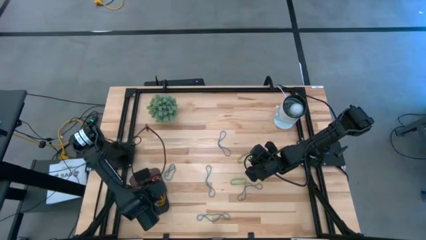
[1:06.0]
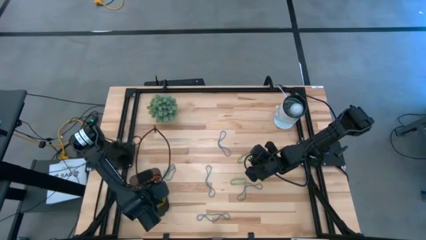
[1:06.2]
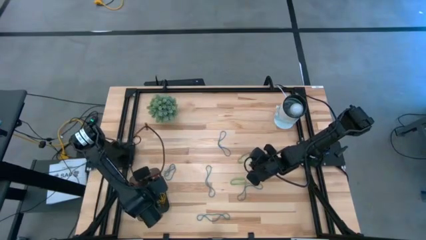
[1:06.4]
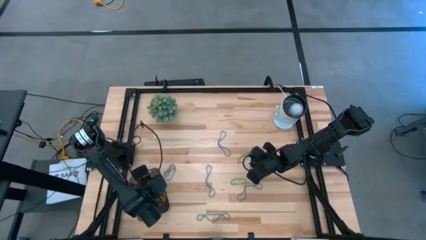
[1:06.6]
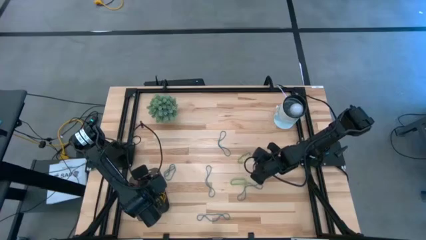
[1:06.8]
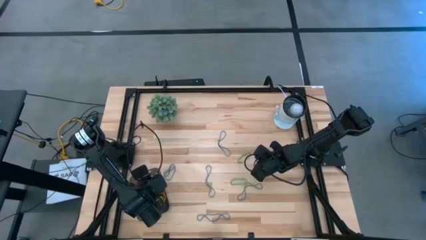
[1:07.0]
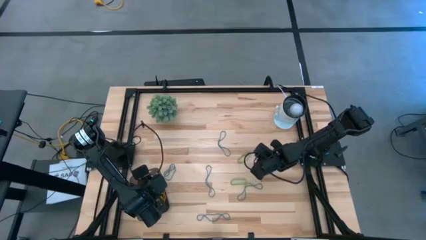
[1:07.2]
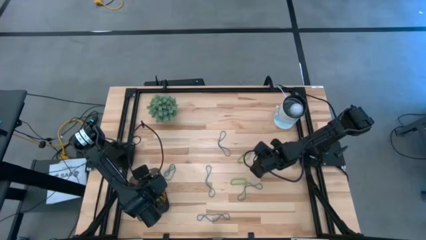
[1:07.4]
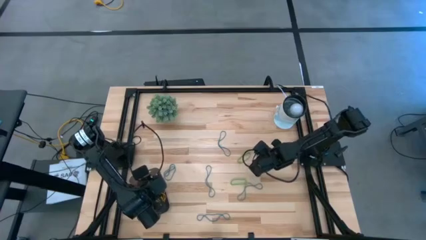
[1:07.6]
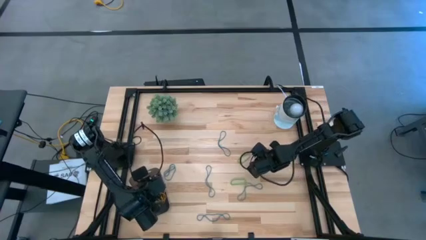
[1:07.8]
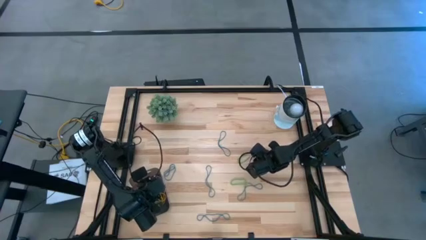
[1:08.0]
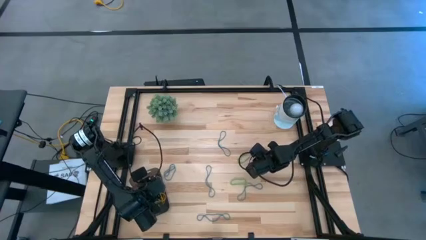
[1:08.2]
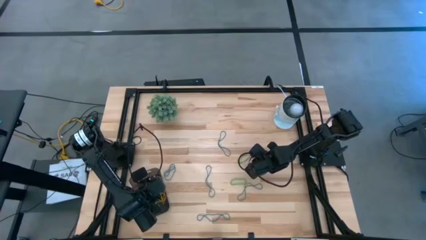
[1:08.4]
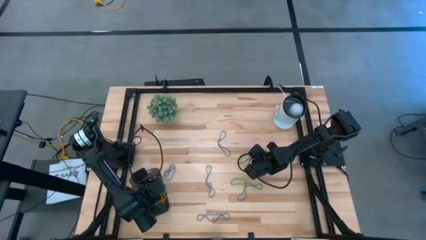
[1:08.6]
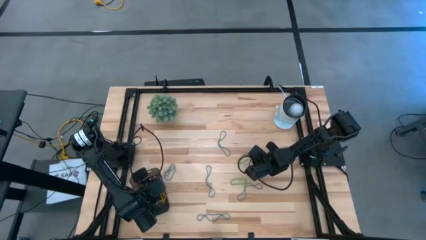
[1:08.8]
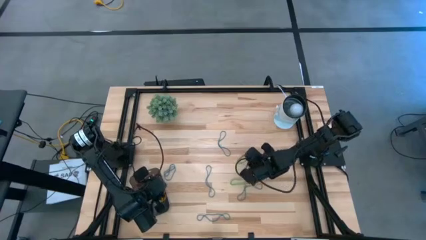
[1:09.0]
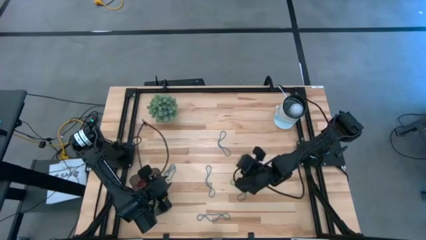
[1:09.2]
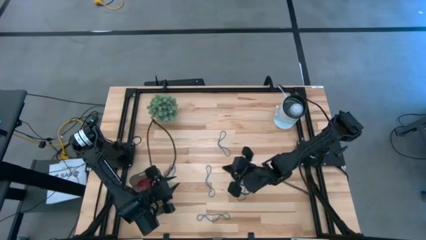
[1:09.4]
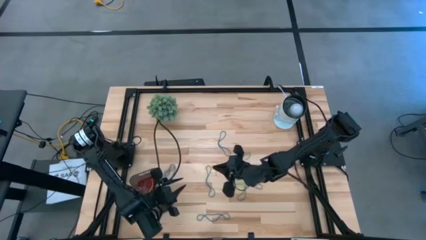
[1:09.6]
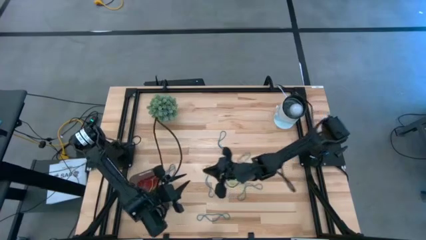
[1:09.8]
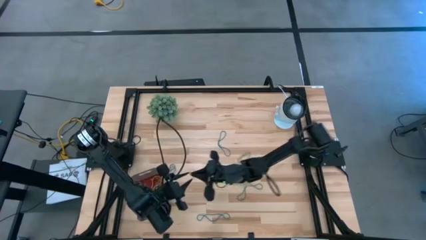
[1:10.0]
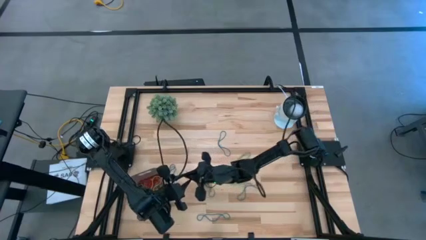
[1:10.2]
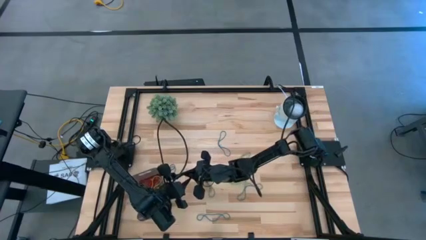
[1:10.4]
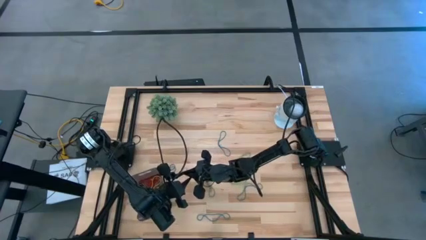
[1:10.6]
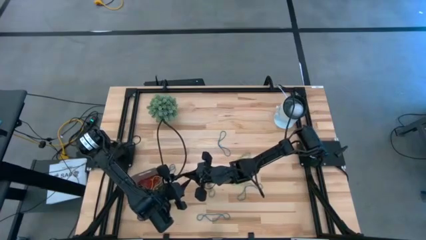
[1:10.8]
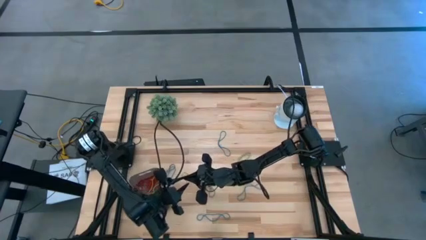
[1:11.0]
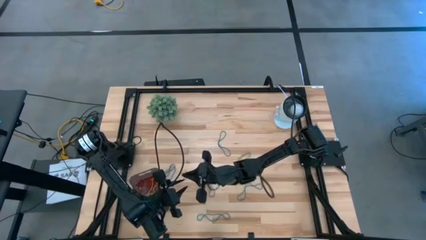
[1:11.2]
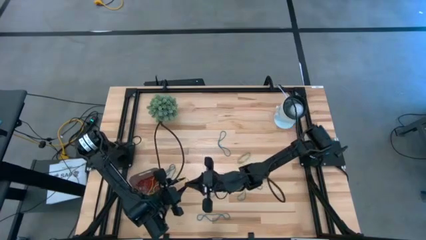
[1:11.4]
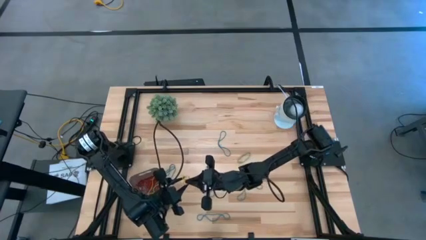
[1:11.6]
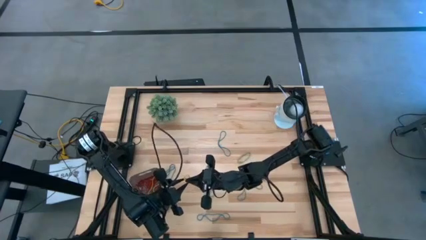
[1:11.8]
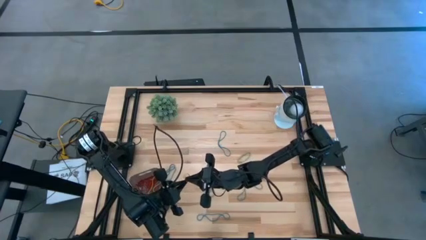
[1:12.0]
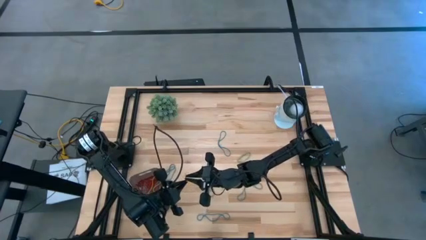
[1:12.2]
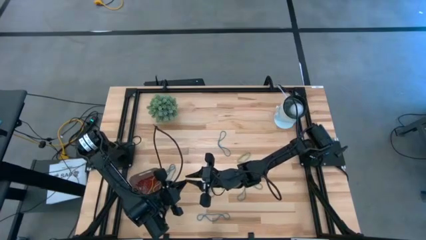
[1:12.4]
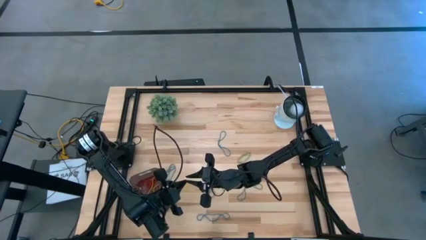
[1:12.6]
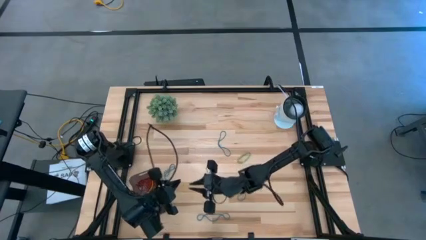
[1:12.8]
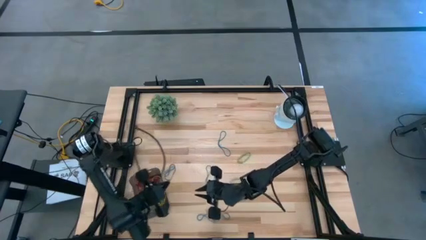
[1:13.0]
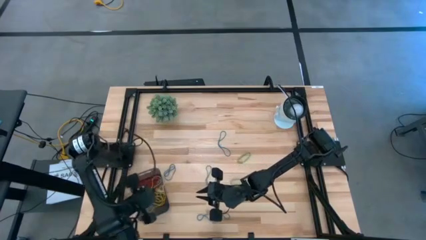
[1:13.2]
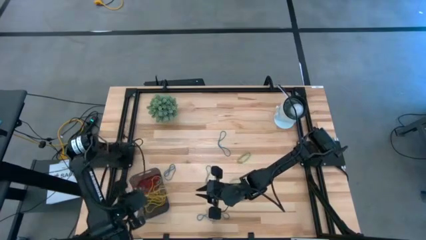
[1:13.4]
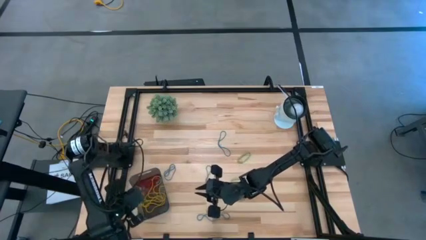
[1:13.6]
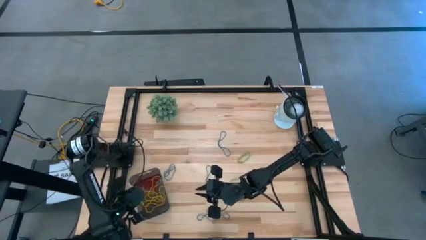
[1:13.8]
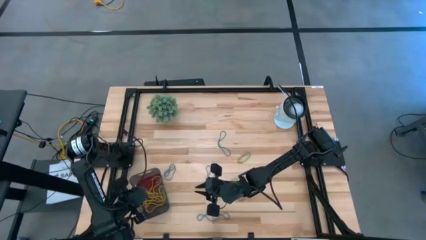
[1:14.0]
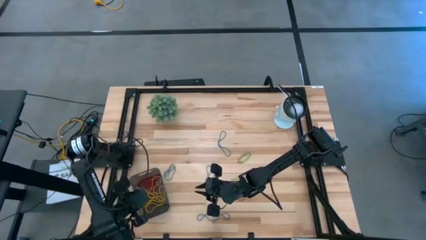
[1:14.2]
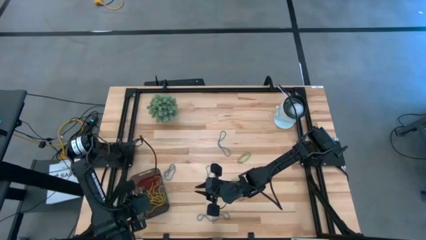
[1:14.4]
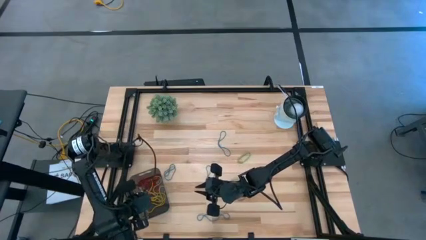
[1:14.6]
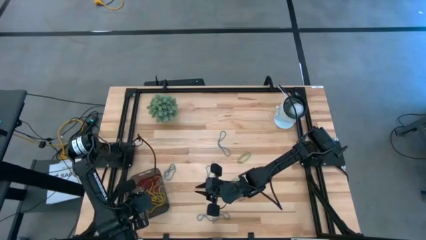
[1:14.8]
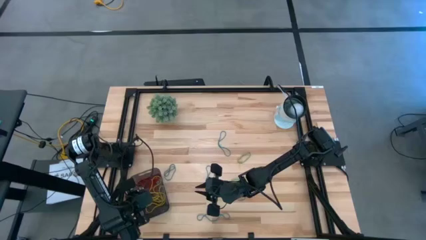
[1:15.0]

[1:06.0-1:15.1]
Task: Pick and place items into bin
Put the yellow rubber band into the black bin

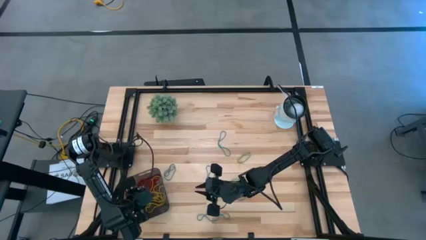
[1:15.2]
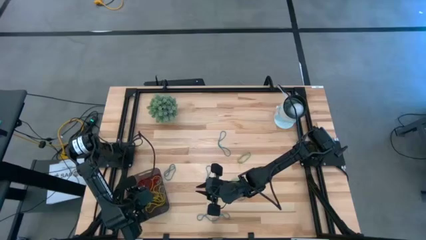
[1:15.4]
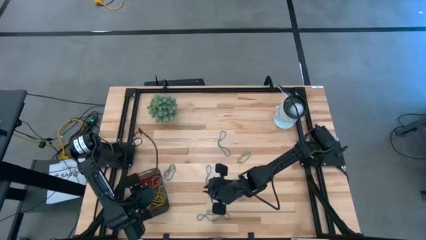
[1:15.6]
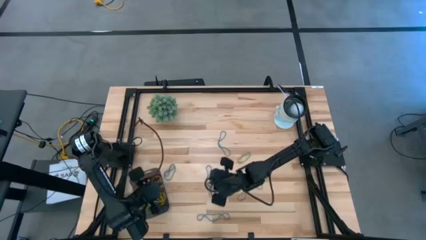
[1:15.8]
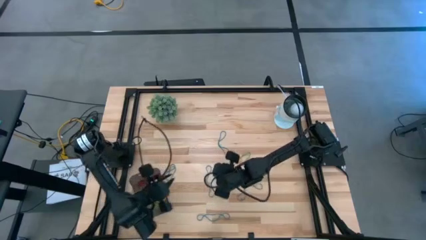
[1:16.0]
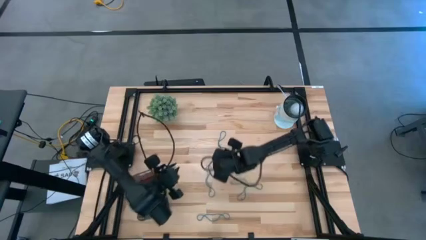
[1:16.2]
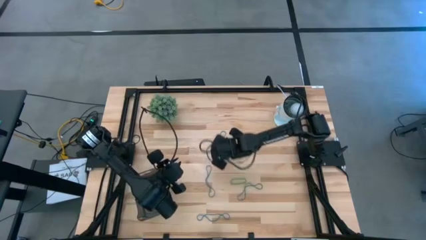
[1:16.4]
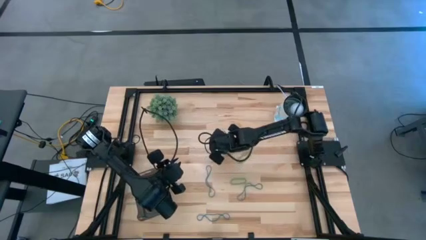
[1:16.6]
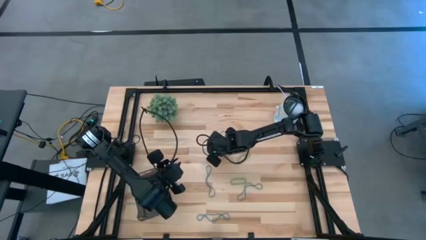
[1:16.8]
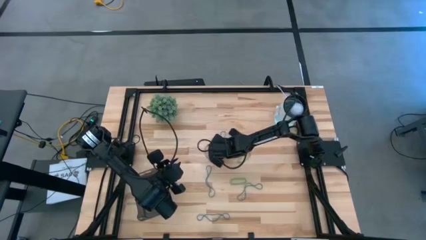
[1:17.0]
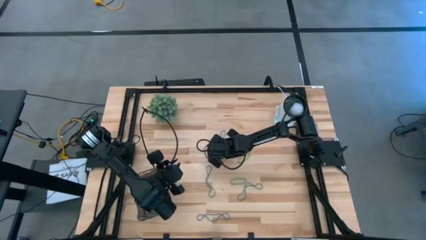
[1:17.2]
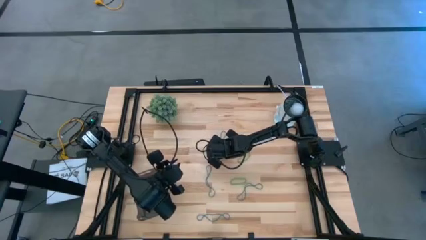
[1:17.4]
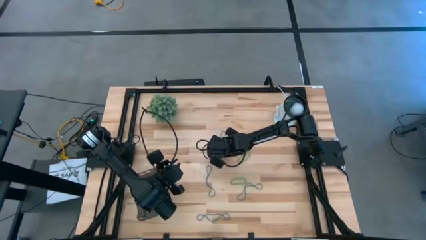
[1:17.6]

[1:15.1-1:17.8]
Put the blue rubber band into the black bin

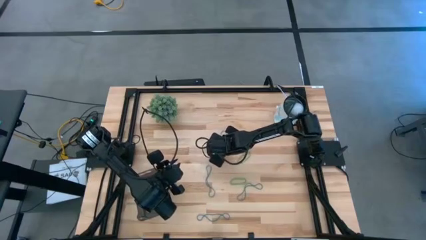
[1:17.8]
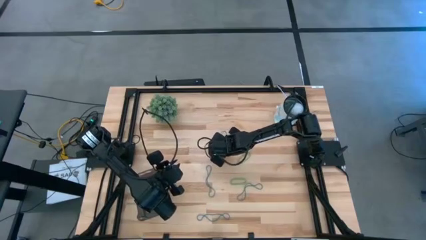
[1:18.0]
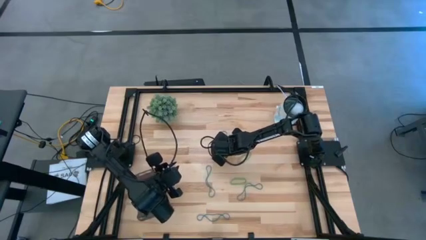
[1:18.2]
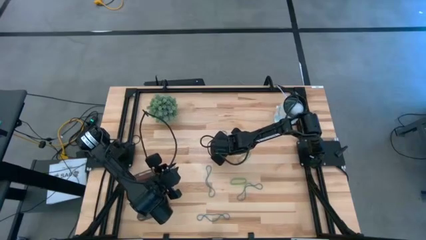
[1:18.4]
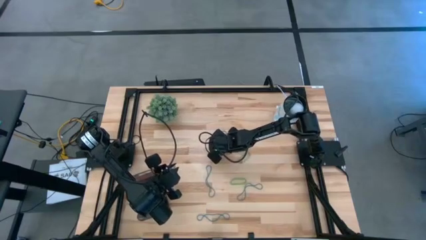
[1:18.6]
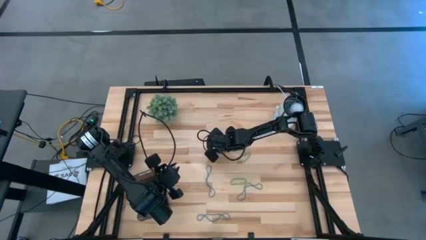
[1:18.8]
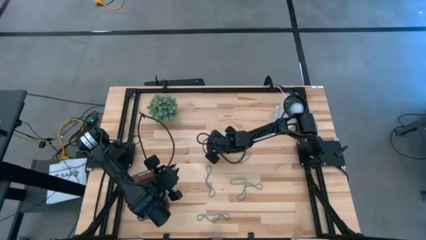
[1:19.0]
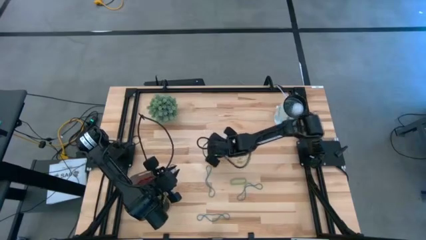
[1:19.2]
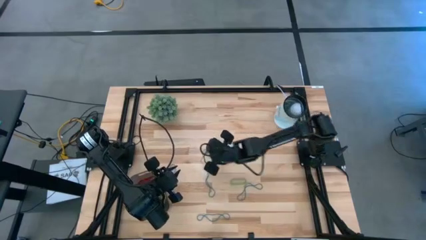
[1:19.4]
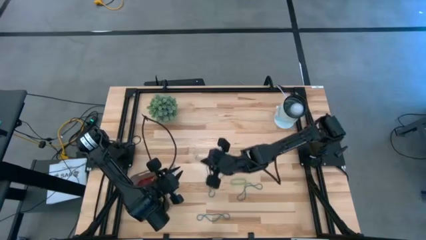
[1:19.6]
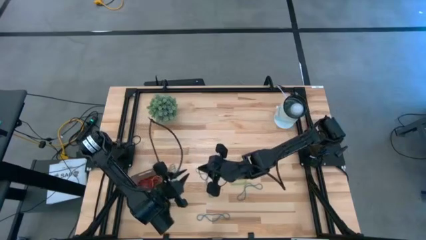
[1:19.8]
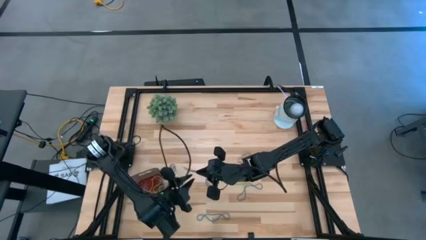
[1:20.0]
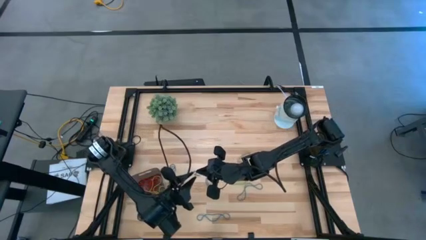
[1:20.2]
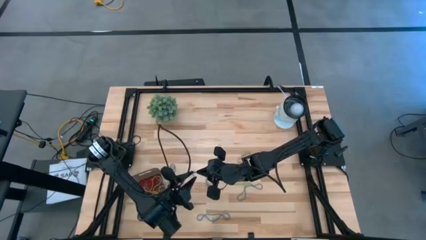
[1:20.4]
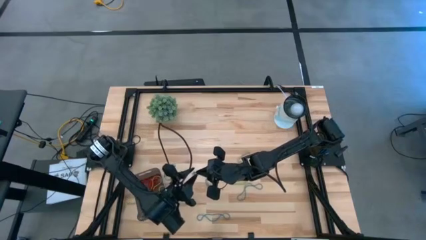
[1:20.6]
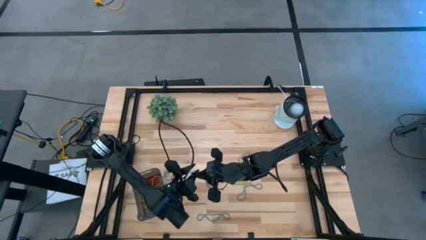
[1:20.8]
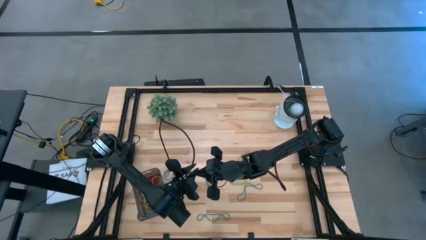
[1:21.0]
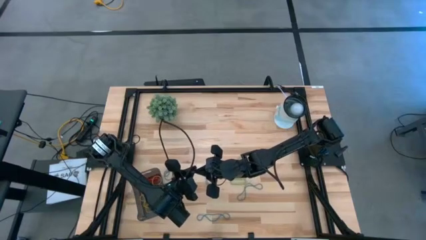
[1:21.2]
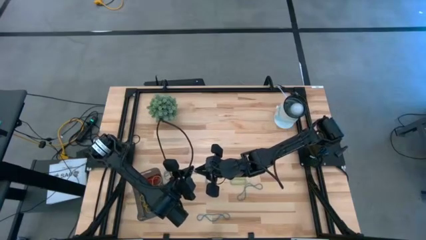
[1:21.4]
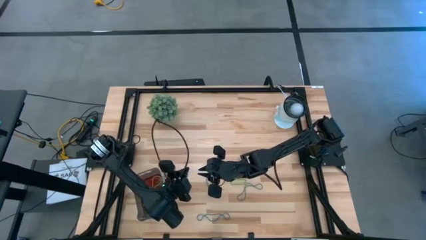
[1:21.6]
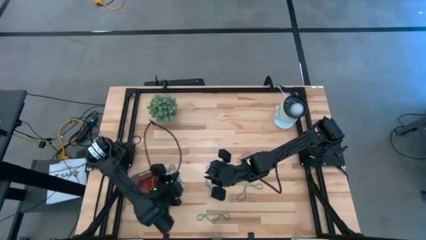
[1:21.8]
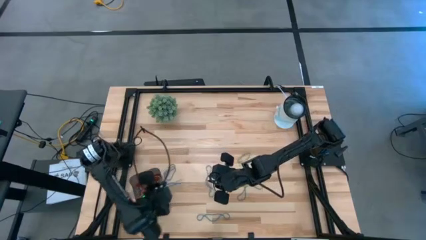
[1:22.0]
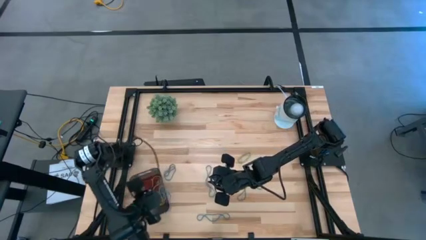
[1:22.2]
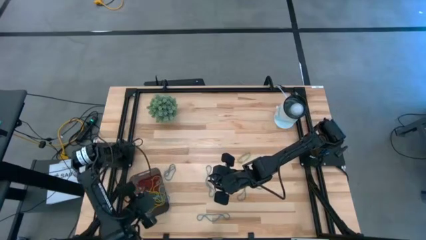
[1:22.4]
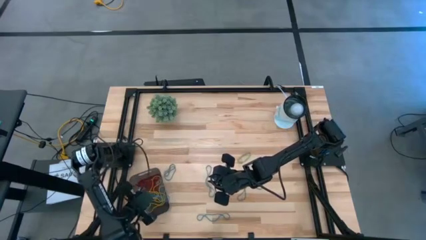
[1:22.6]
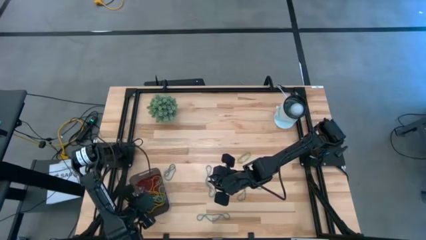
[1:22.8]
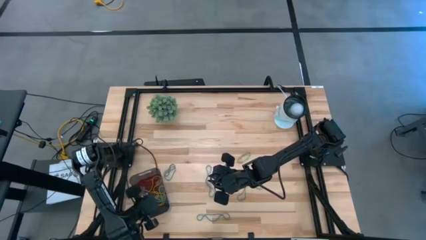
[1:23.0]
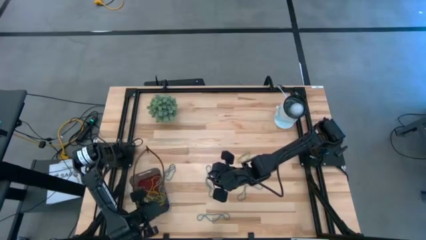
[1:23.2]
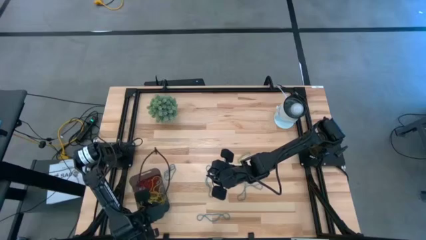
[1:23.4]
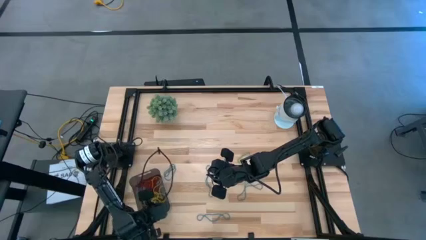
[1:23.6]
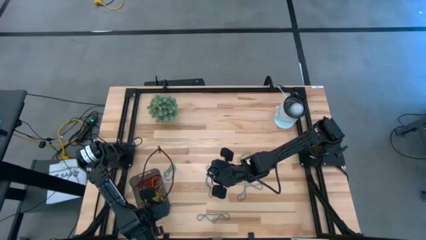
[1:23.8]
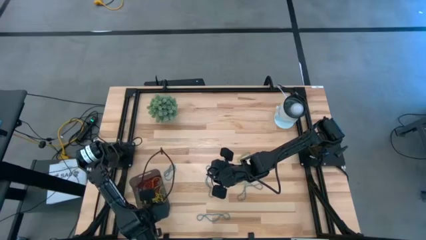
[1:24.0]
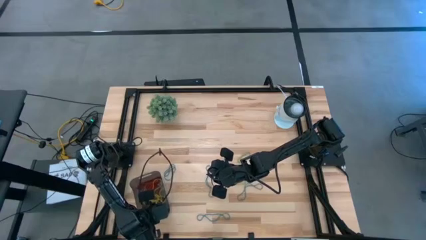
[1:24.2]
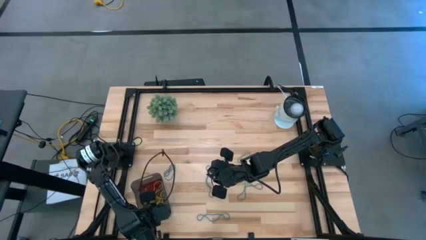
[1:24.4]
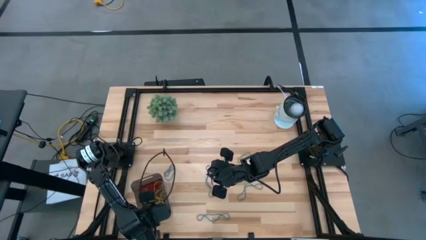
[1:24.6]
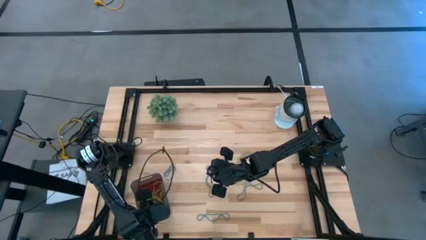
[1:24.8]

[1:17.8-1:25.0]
Put the blue rubber band into the black bin
